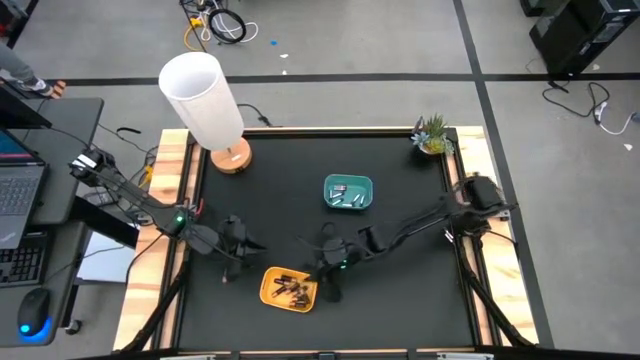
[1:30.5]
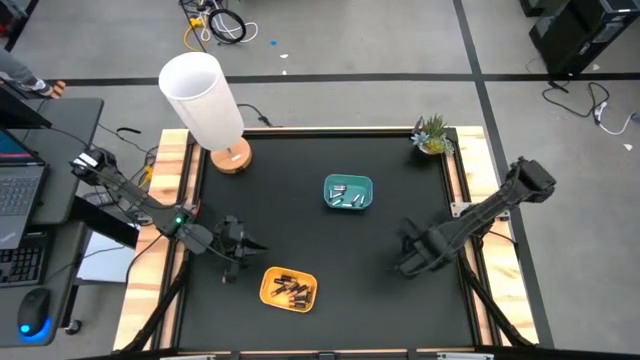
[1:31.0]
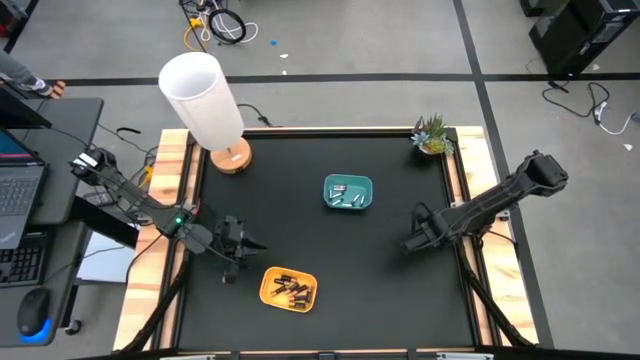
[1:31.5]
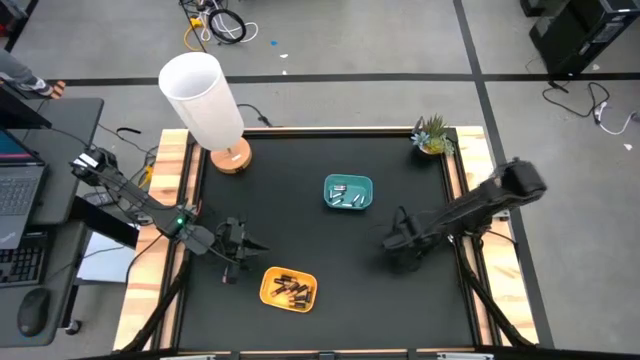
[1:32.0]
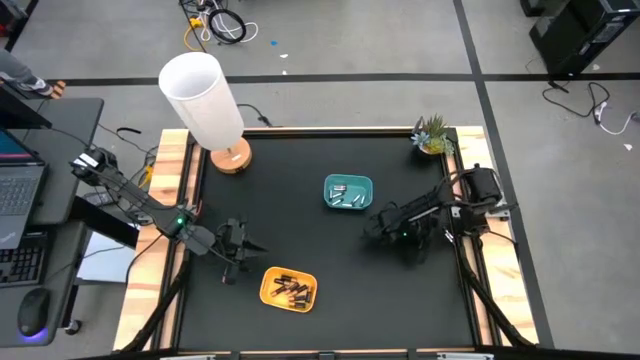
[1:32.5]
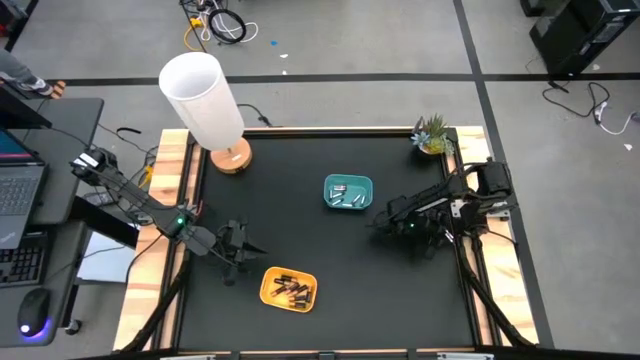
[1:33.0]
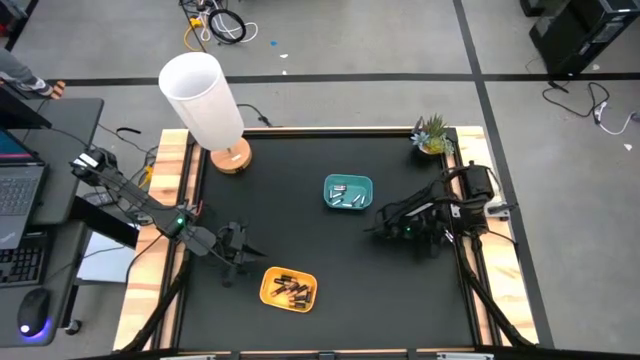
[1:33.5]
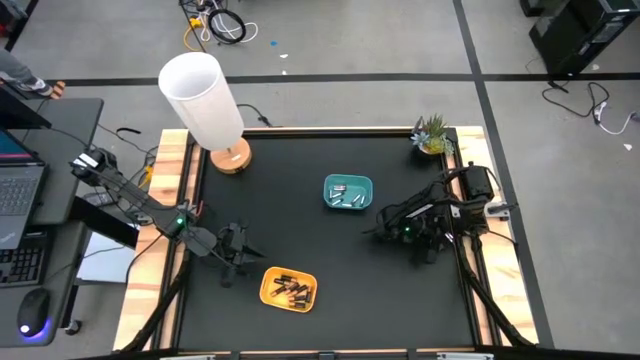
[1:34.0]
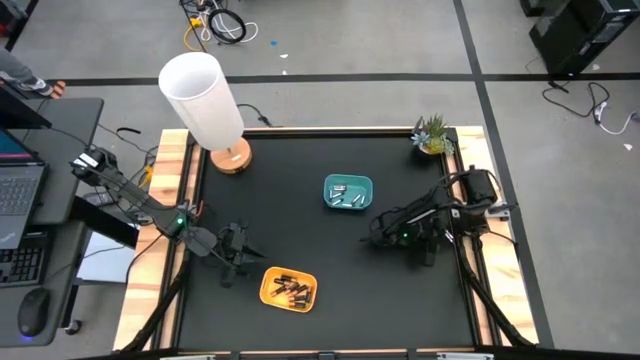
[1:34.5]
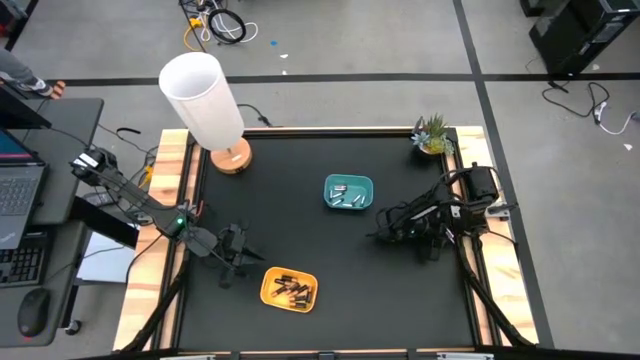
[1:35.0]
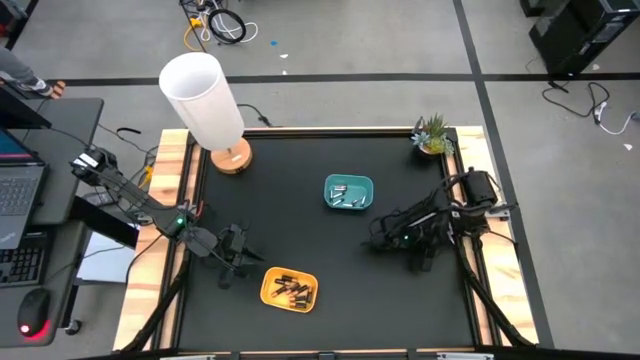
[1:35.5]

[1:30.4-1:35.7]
Task: Sort batteries
Put the silver battery into the blue bin

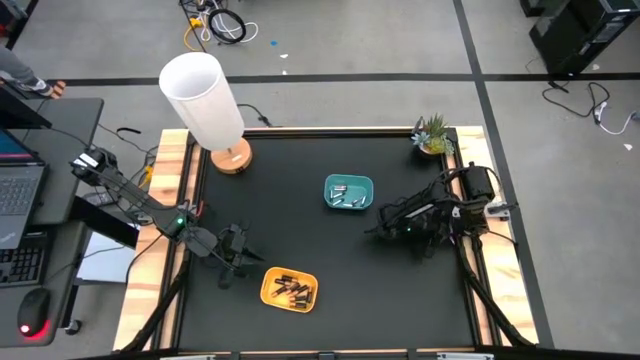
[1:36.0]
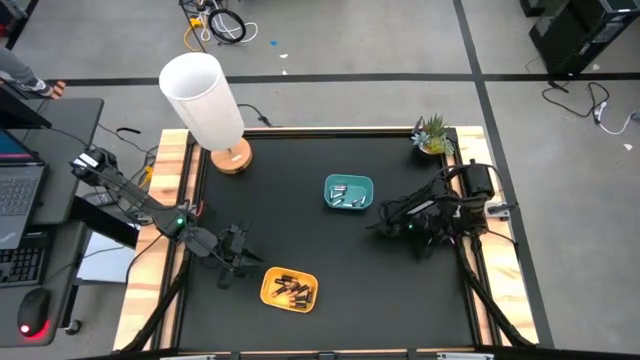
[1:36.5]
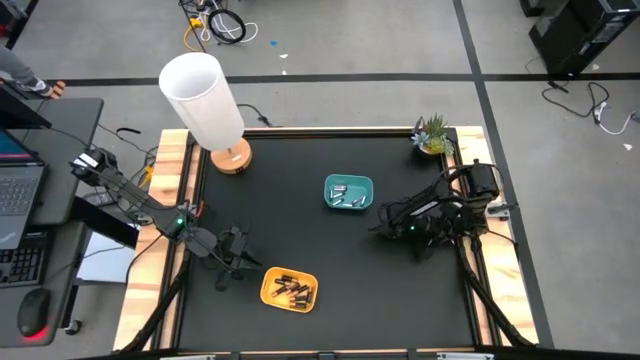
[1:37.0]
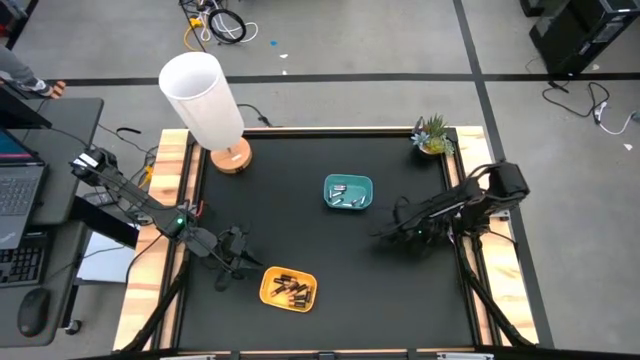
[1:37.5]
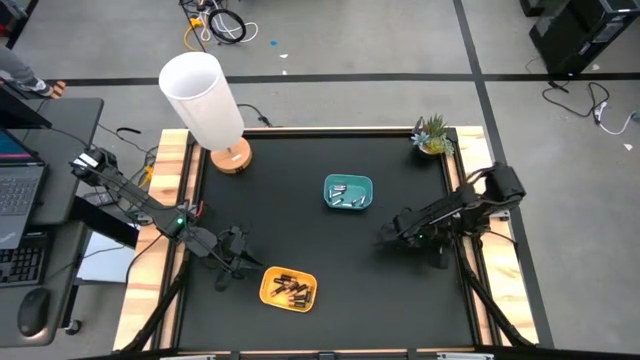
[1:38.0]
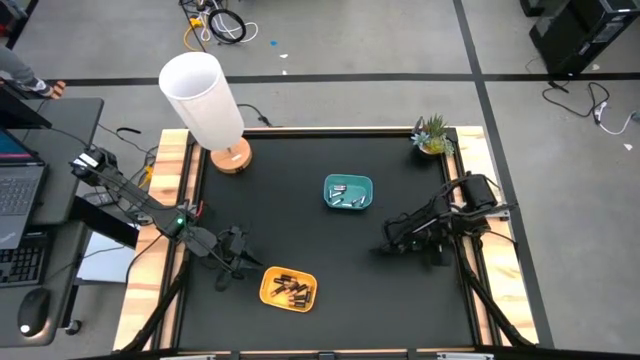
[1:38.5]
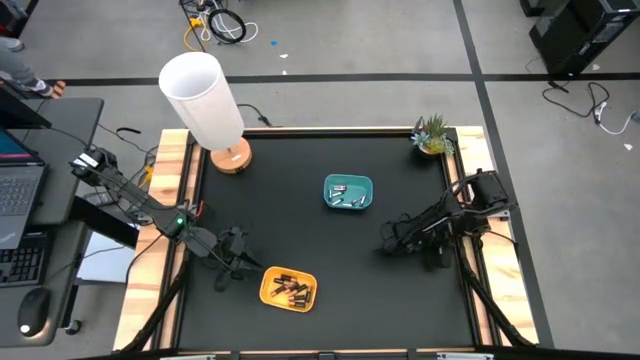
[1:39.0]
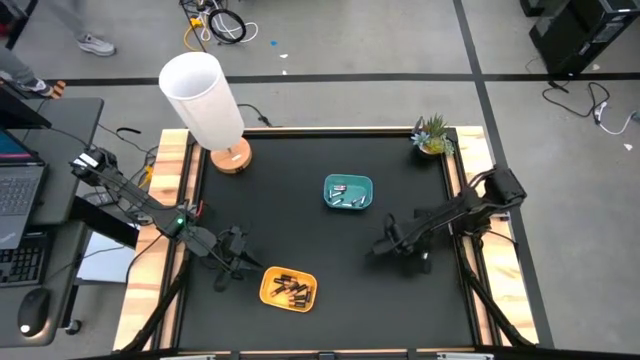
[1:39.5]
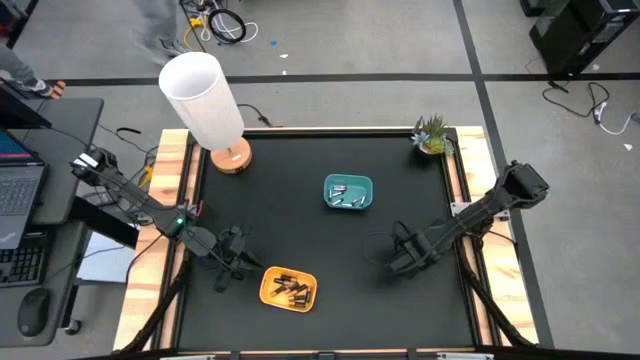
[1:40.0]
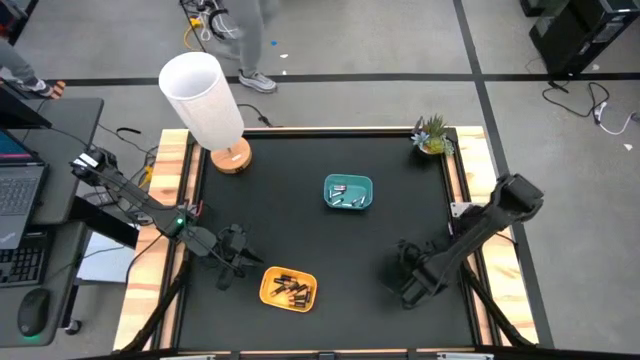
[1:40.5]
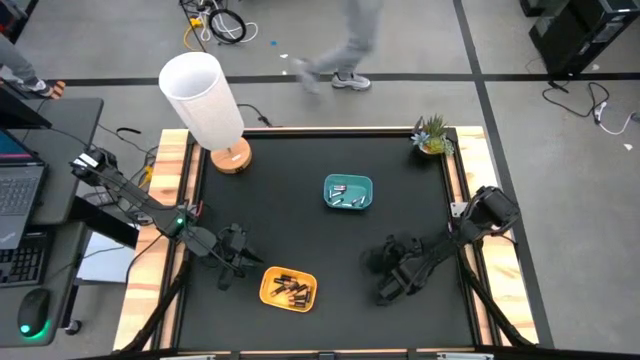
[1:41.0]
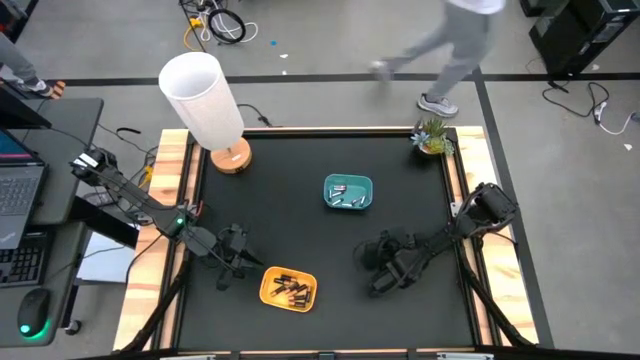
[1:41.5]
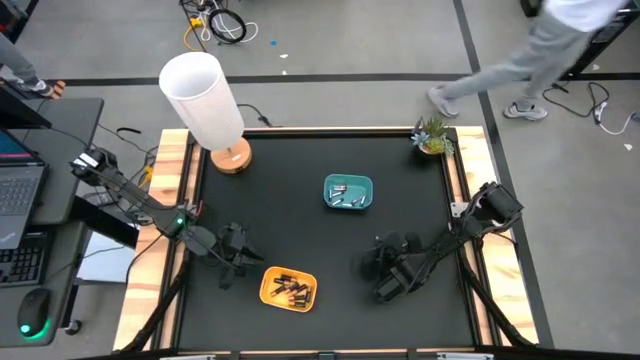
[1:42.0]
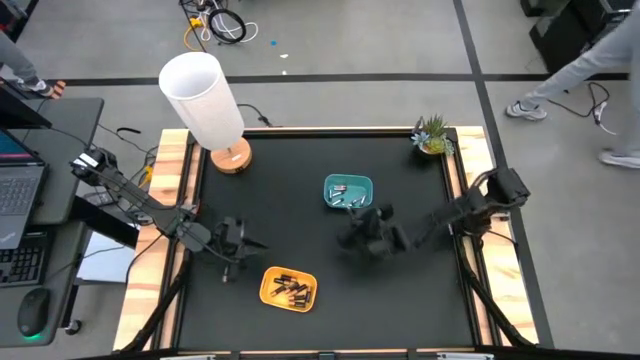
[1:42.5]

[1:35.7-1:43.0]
Put the silver battery into the blue bin

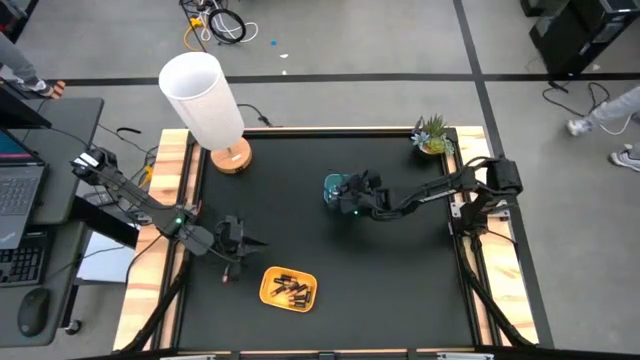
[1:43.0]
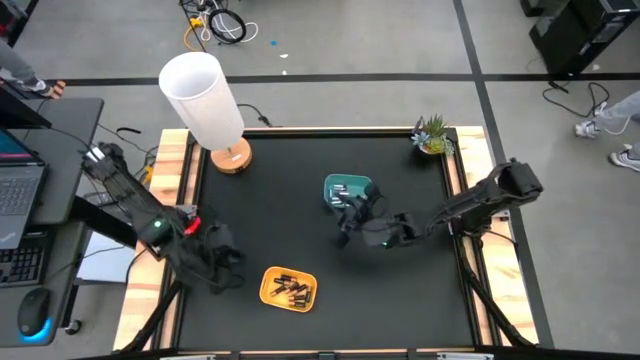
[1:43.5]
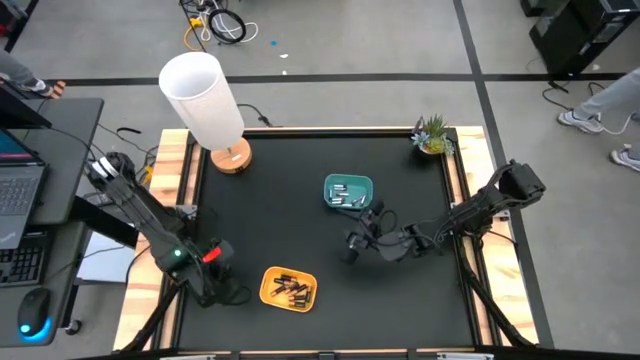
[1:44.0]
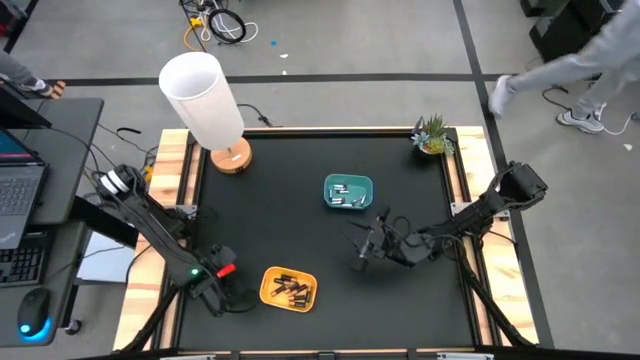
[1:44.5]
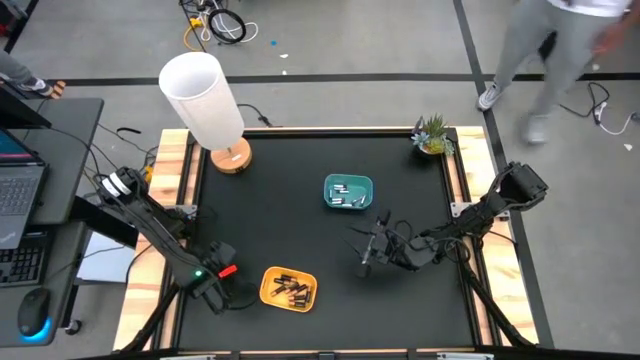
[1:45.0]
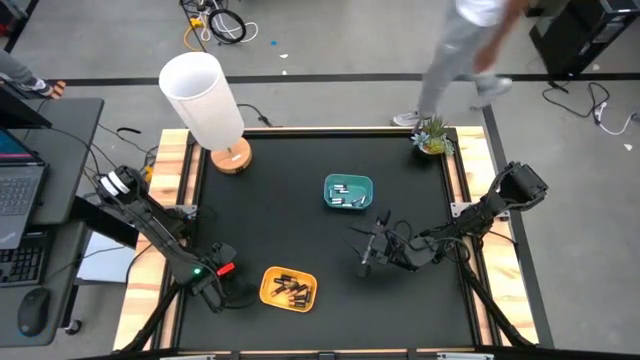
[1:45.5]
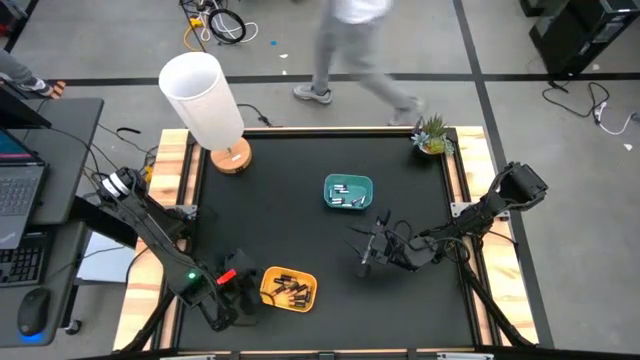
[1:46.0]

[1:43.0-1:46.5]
Put the black battery into the yellow bin

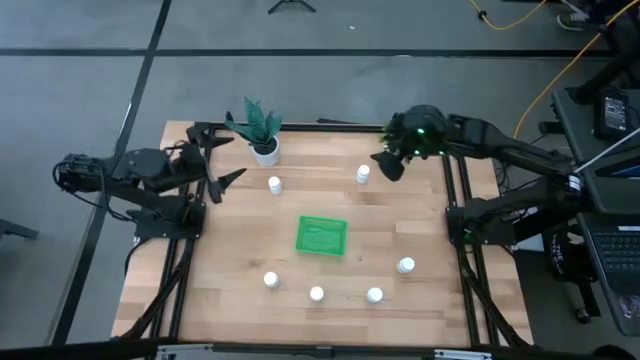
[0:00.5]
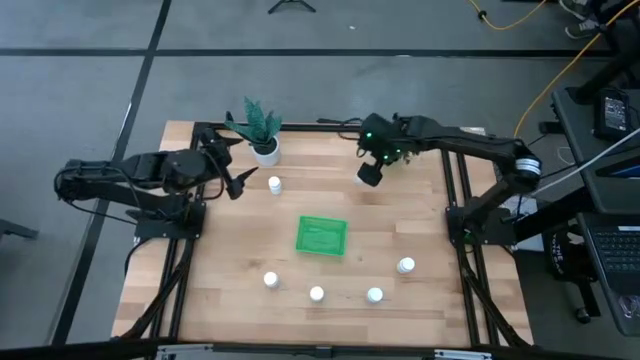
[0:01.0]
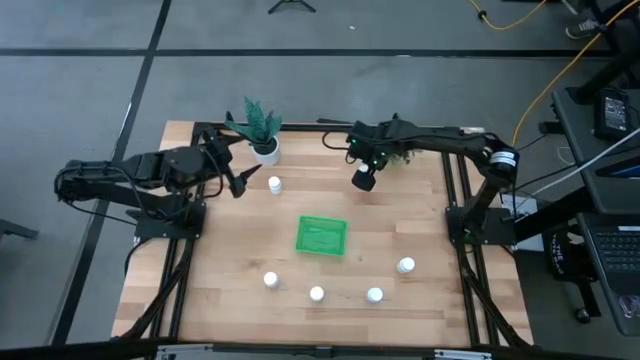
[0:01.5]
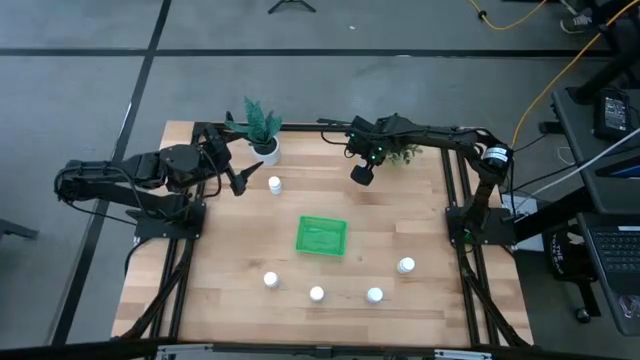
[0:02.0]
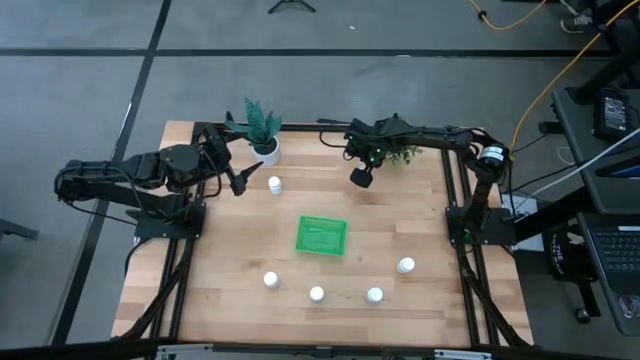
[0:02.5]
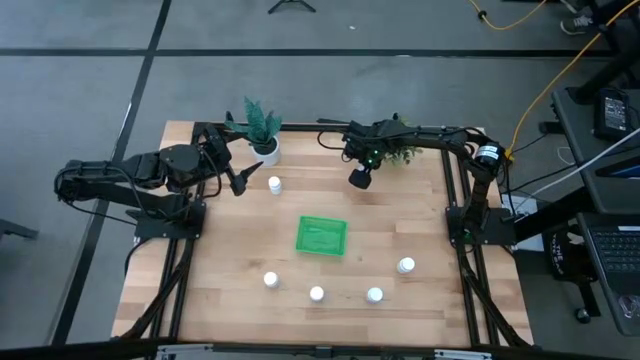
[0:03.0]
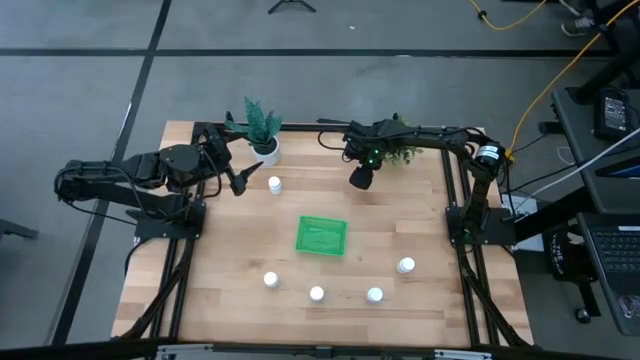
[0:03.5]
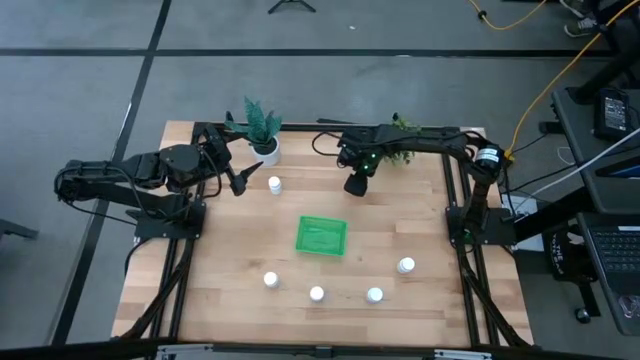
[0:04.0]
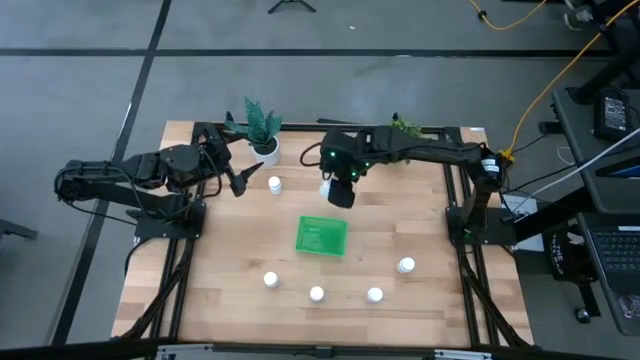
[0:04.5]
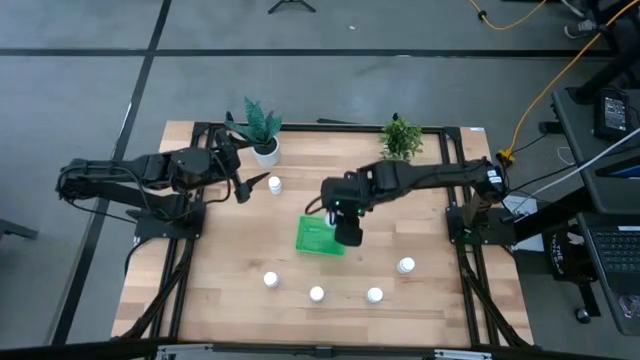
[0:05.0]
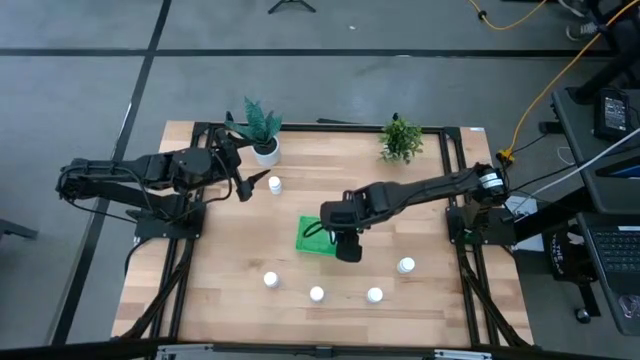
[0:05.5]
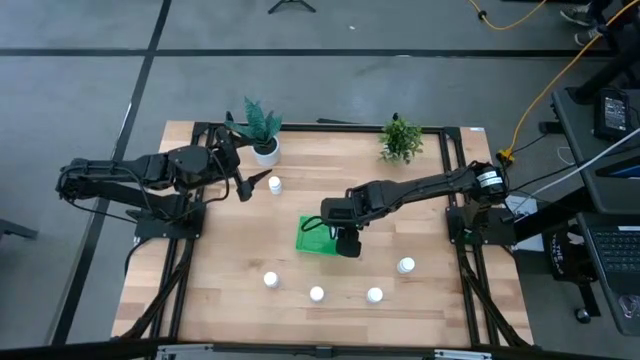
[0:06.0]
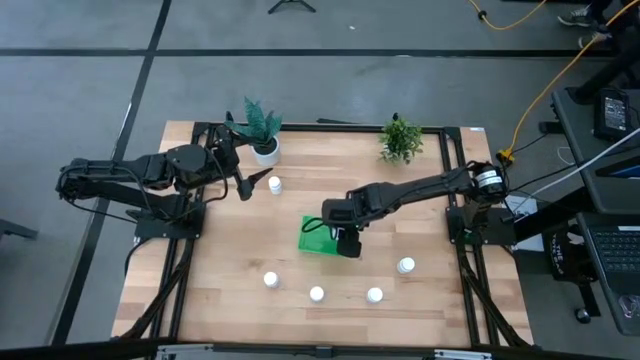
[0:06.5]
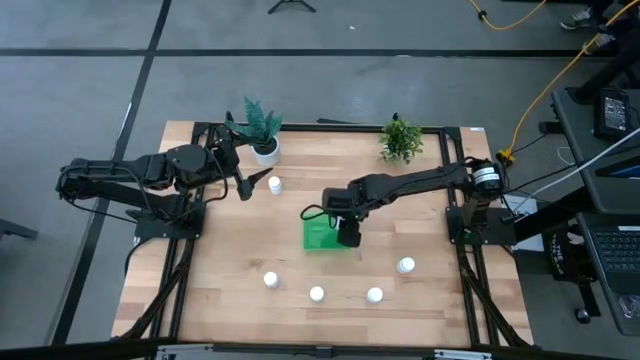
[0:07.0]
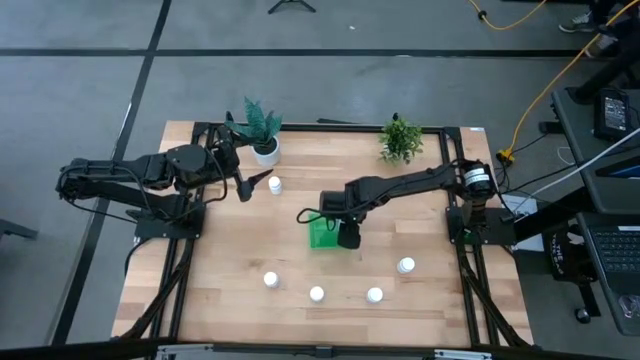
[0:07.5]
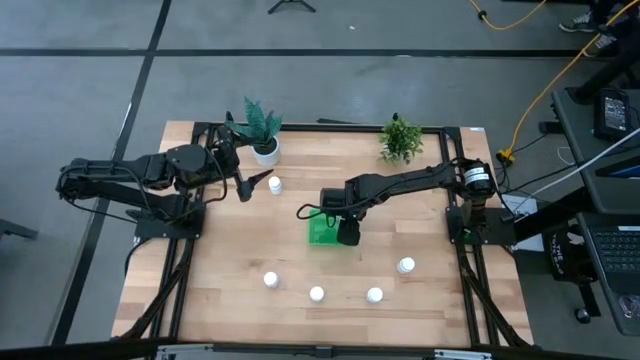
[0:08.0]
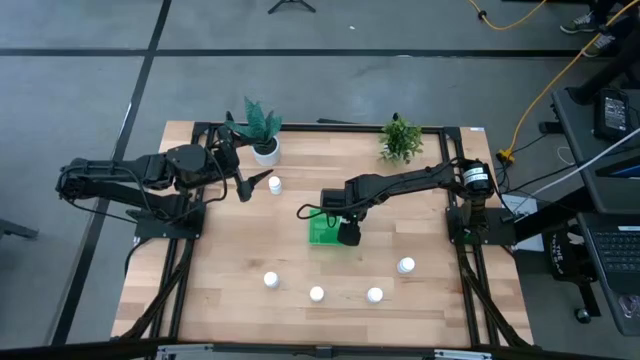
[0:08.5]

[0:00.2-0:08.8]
Task: Pick and place pill bottles into a basket
Put the white pill bottle into the green bin
